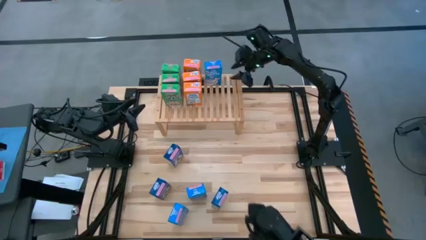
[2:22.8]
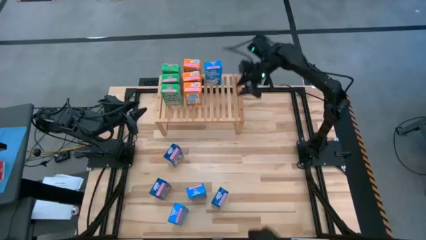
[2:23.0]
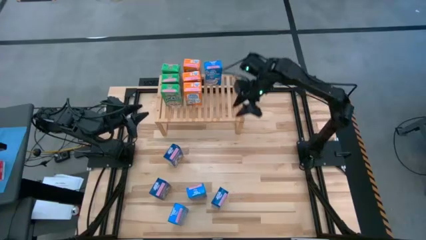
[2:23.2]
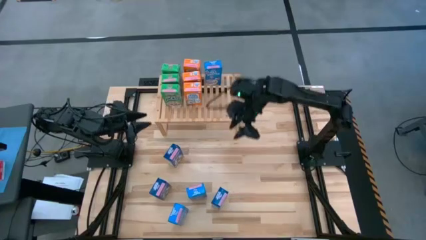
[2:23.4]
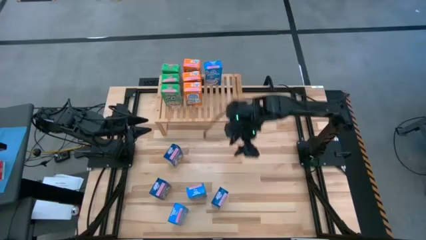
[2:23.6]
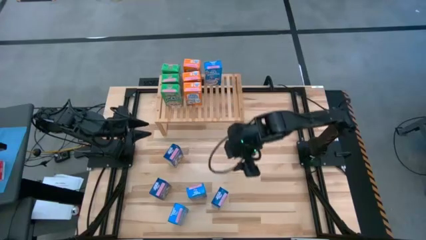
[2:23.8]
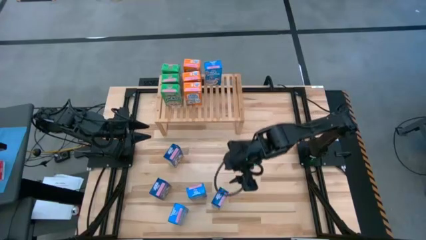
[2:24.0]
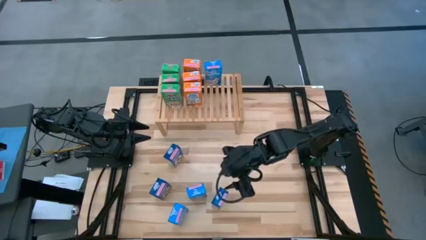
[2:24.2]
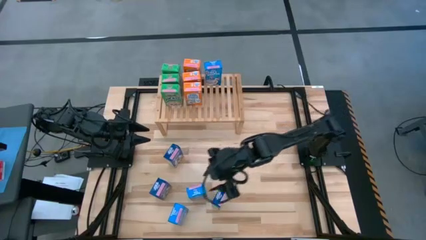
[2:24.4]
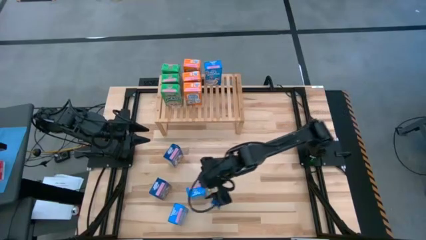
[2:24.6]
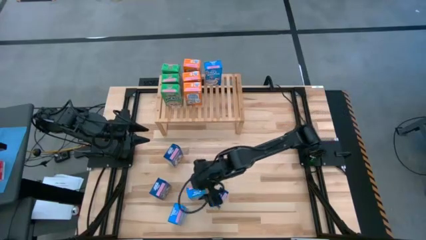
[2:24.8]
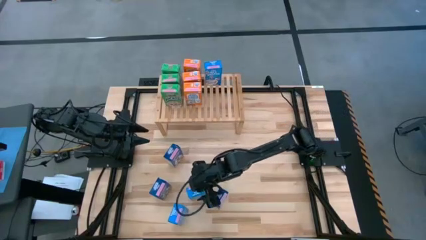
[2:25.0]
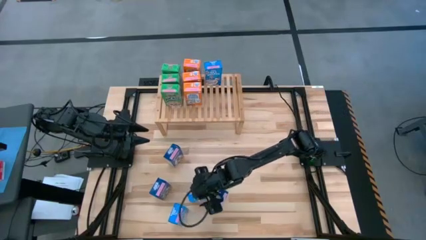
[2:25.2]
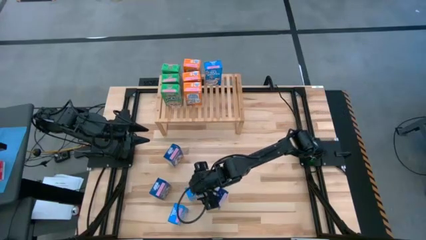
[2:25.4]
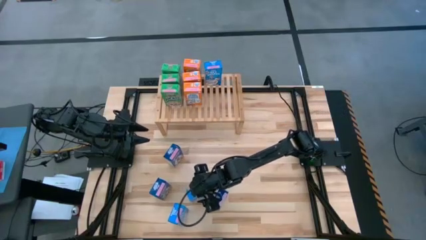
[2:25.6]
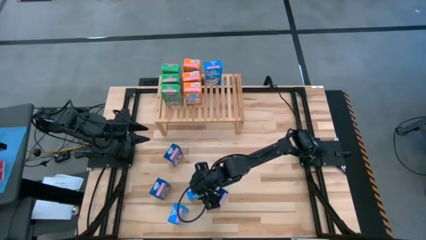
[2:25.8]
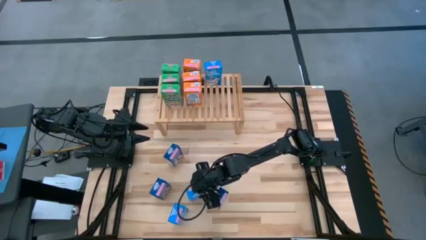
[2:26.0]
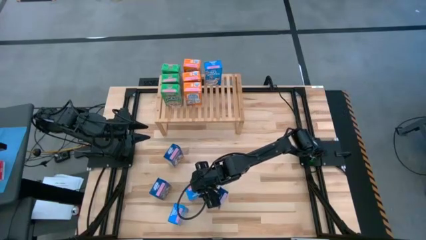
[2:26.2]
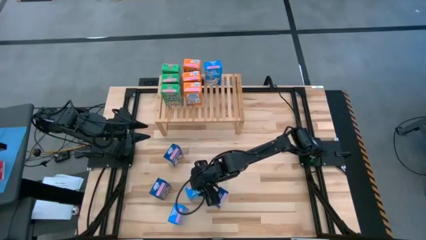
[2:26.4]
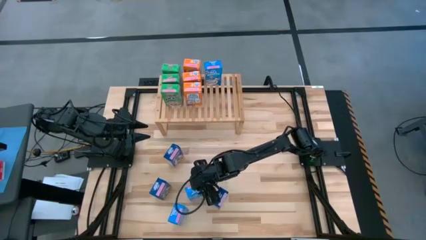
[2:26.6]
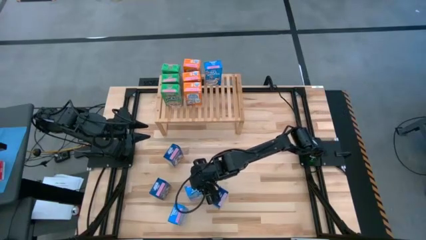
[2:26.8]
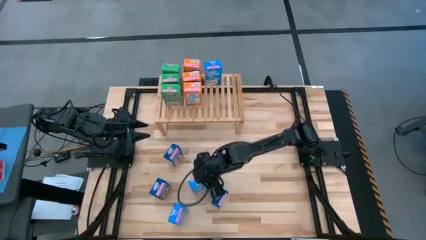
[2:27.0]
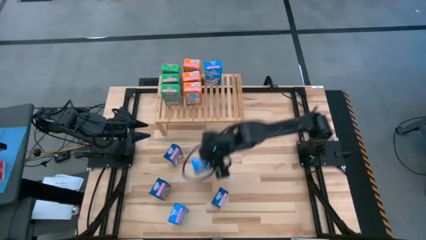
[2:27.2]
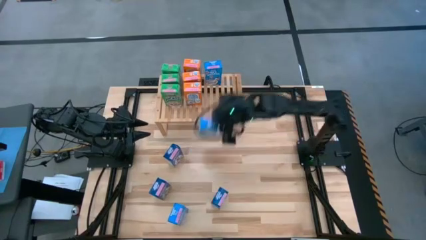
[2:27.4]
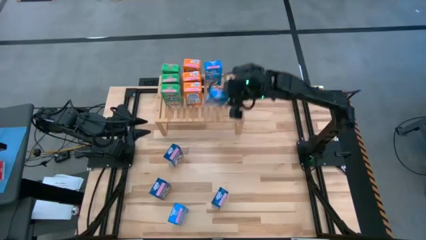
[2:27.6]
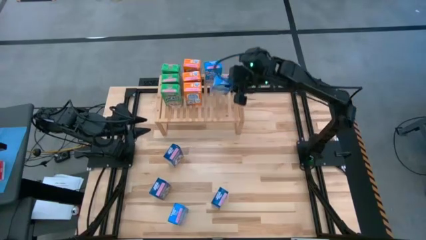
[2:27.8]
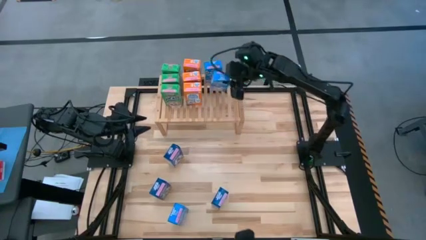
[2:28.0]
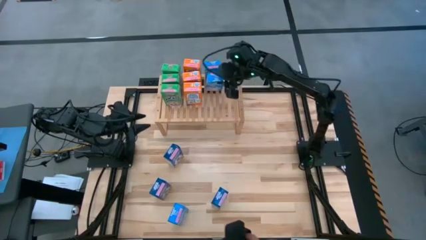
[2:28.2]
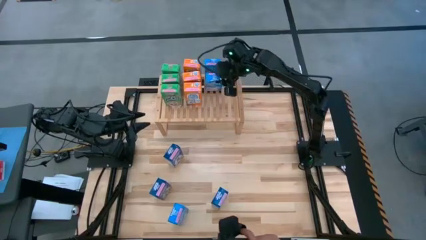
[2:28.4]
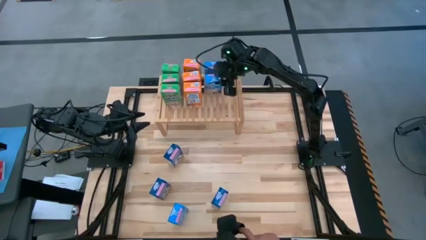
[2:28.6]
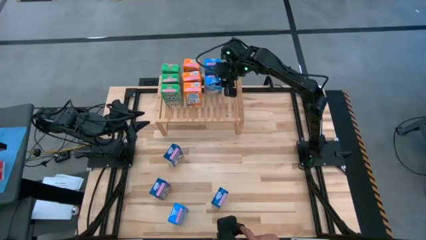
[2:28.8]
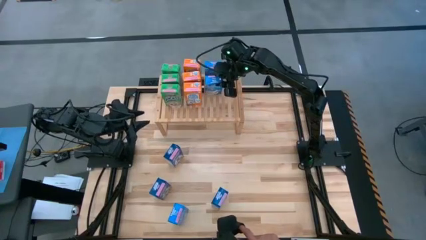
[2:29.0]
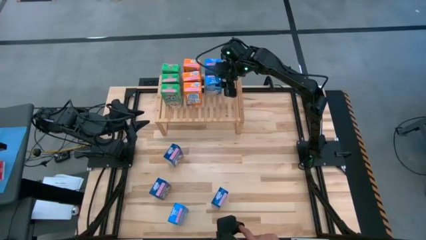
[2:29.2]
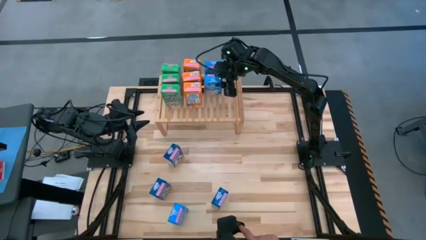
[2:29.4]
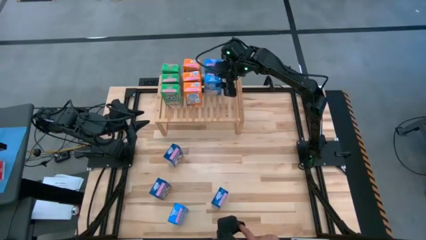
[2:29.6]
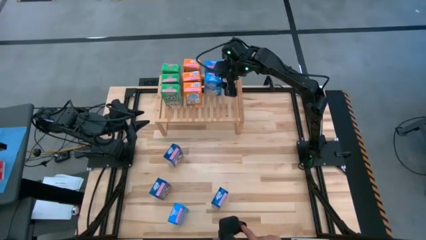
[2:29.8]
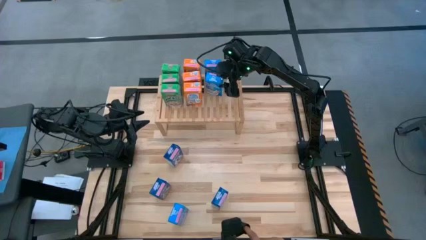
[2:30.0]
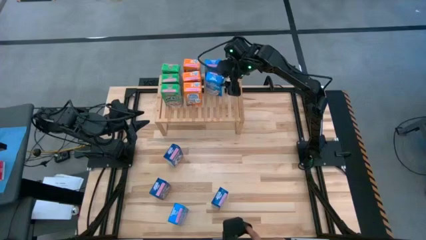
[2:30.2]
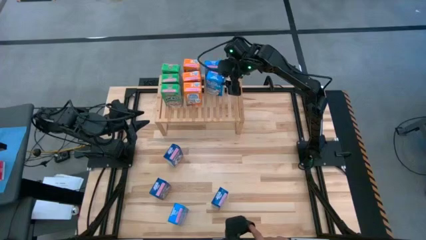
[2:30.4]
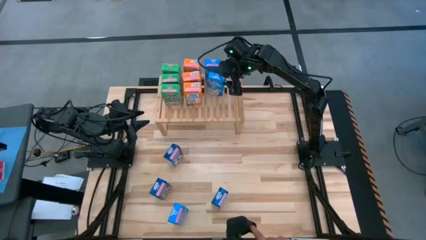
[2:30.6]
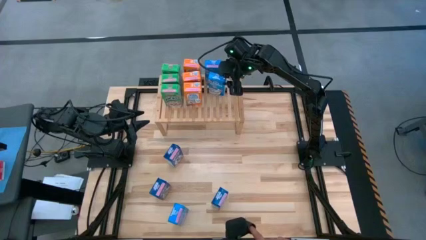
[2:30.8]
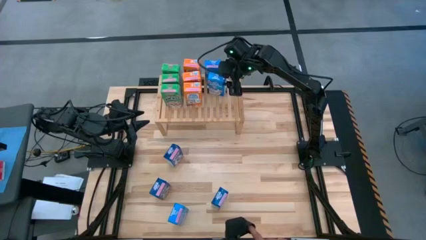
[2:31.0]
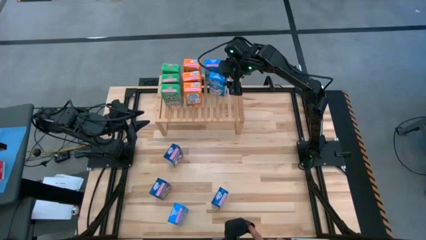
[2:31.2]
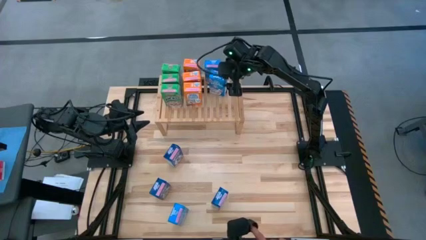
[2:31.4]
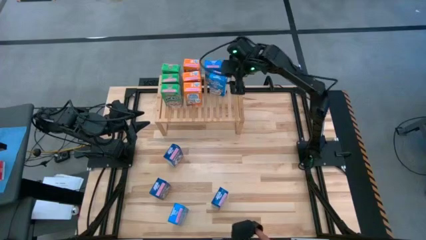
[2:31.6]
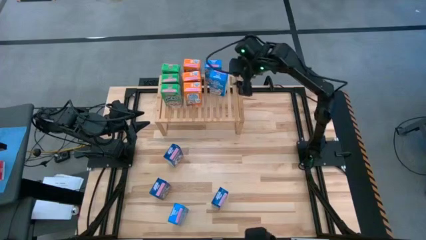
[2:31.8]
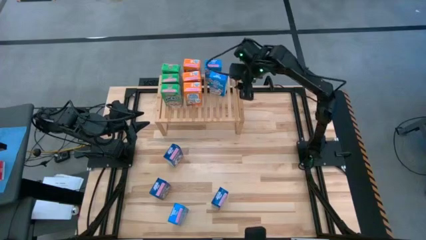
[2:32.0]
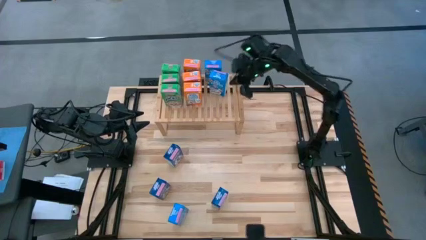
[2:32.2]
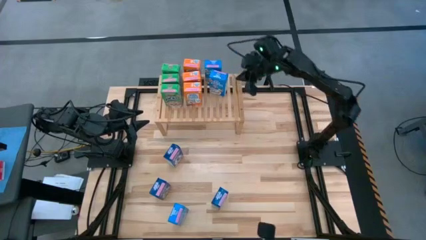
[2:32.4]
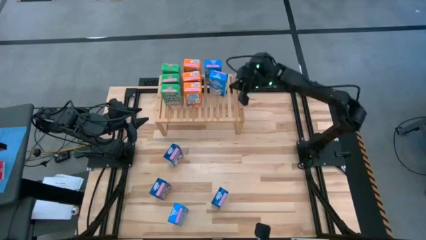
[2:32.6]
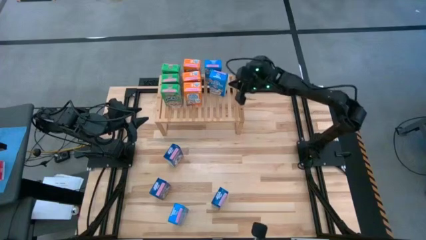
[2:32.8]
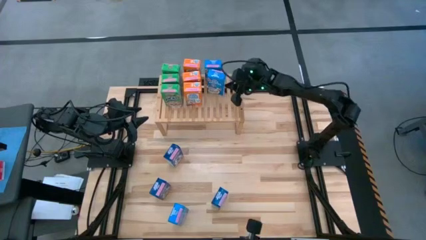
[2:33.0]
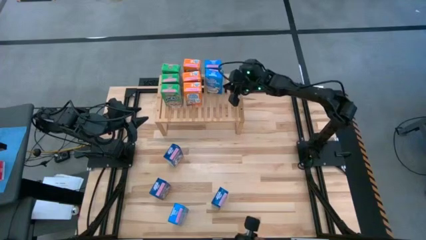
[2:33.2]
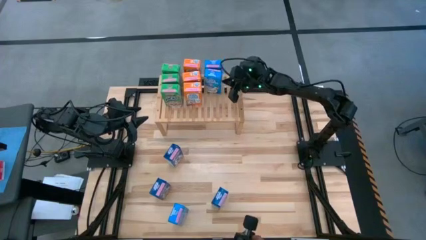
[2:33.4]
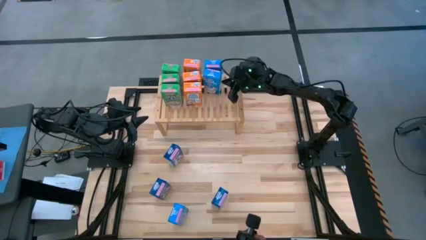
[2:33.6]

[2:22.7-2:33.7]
Task: Stack cereal on shelf
Put the top light blue cereal box on the shelf aligned with the other light blue cereal box
